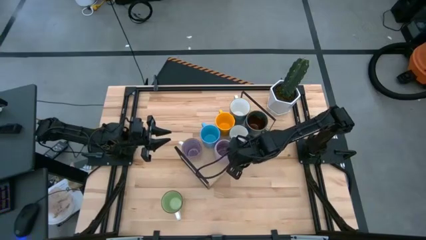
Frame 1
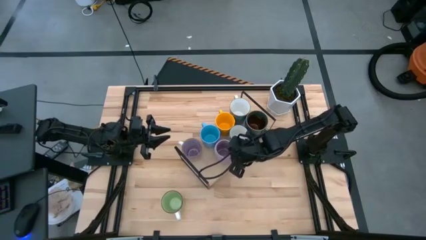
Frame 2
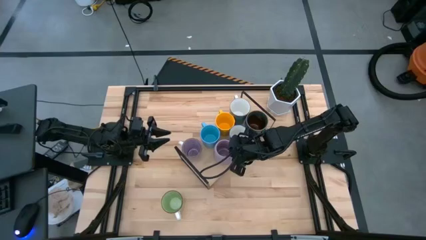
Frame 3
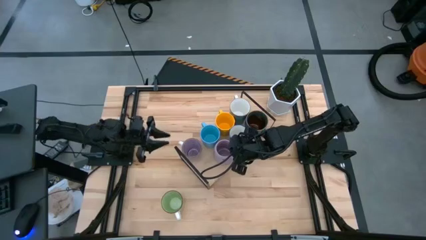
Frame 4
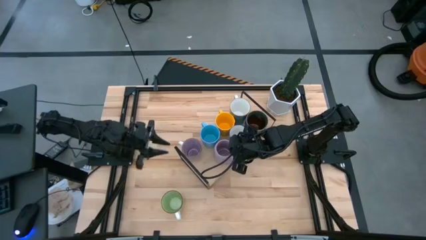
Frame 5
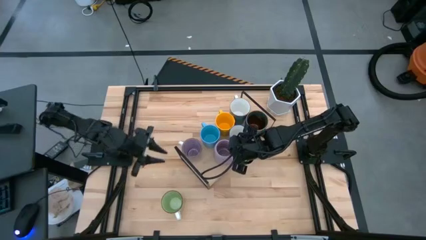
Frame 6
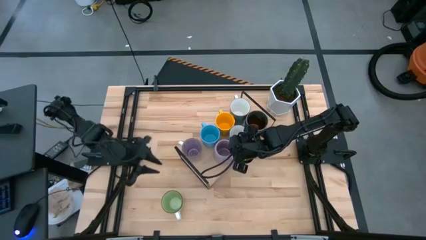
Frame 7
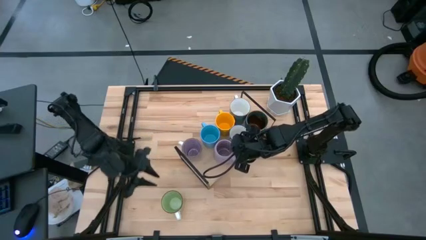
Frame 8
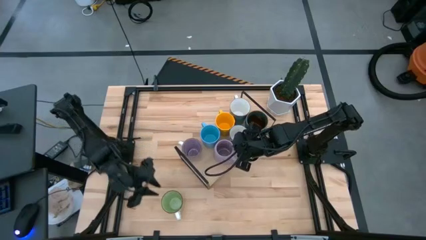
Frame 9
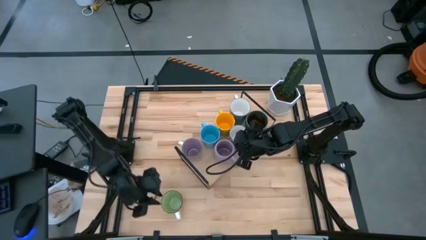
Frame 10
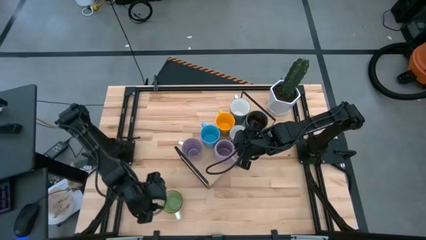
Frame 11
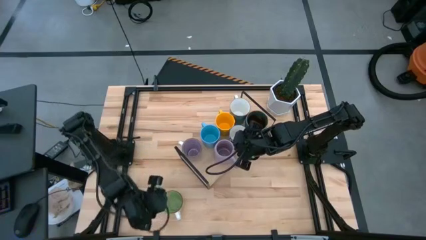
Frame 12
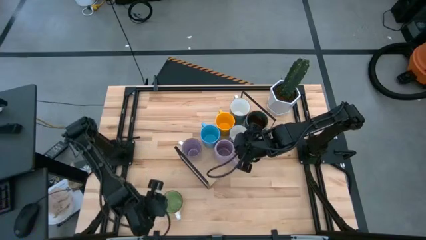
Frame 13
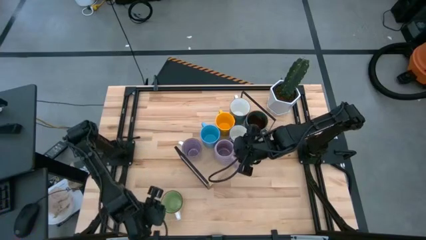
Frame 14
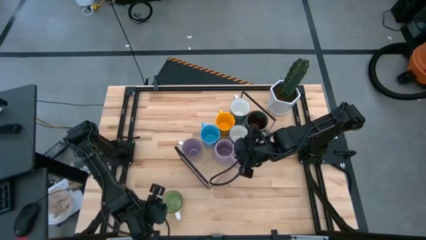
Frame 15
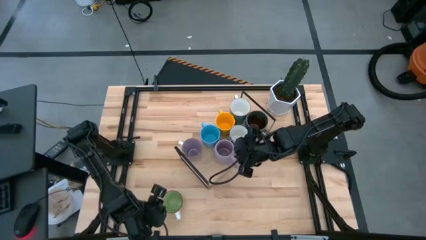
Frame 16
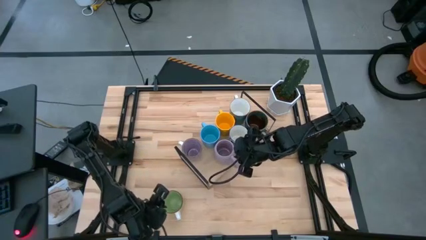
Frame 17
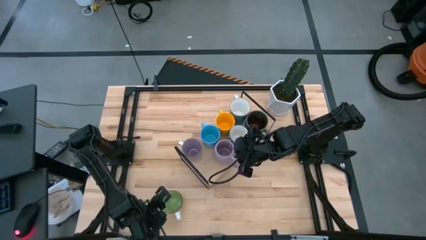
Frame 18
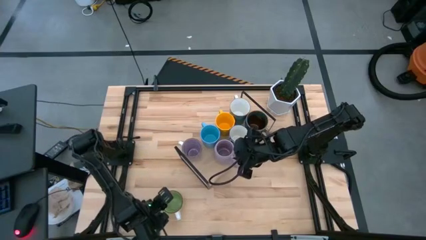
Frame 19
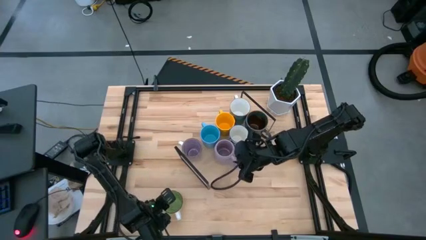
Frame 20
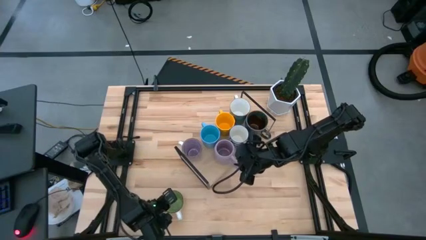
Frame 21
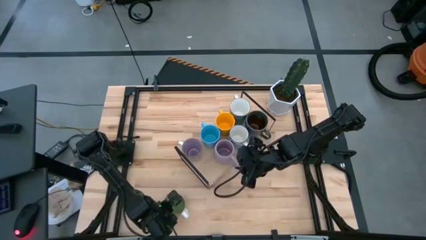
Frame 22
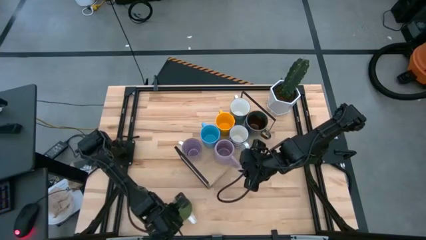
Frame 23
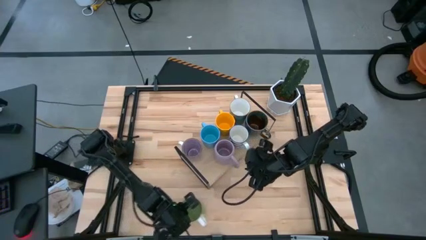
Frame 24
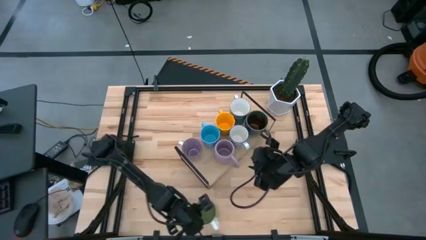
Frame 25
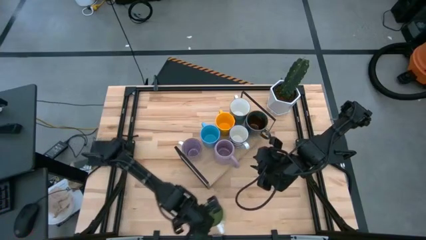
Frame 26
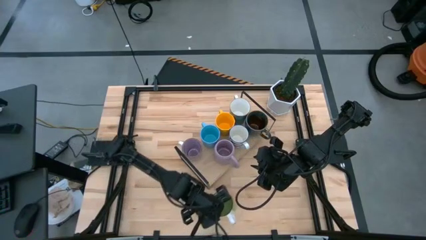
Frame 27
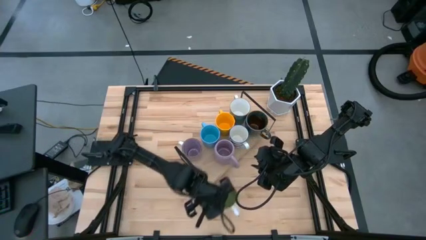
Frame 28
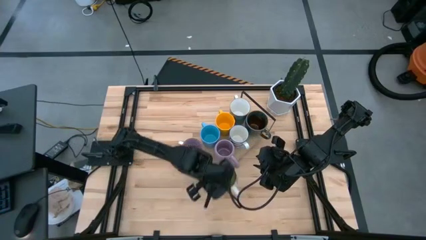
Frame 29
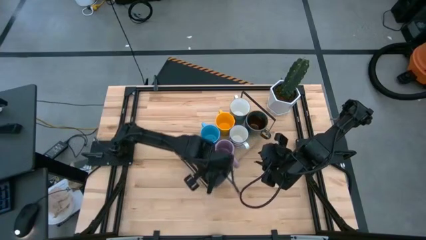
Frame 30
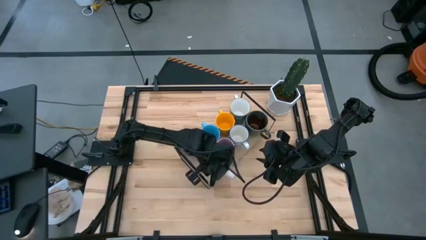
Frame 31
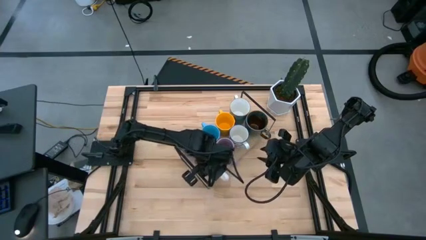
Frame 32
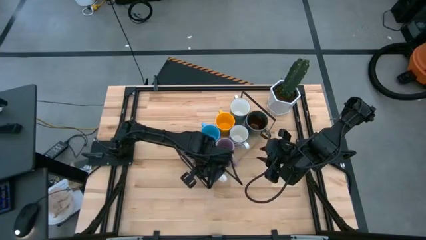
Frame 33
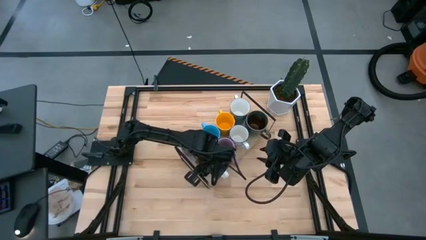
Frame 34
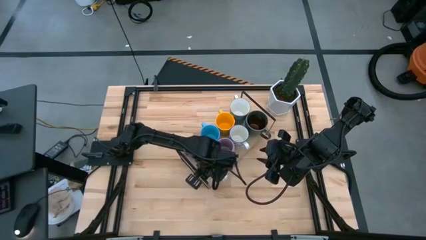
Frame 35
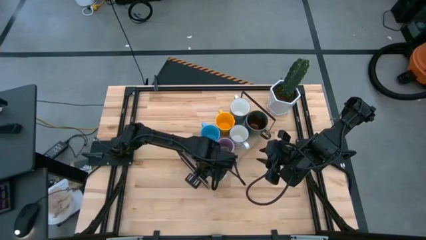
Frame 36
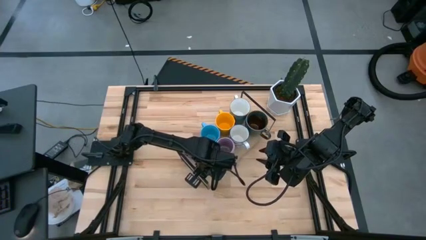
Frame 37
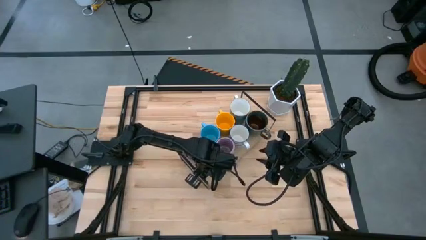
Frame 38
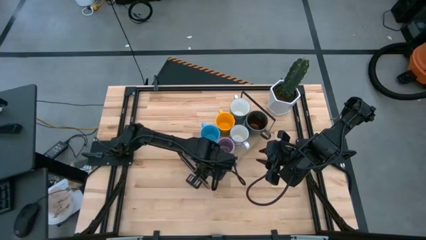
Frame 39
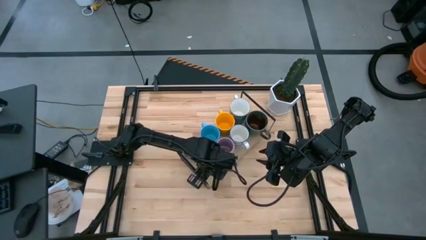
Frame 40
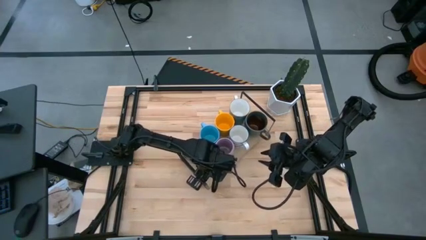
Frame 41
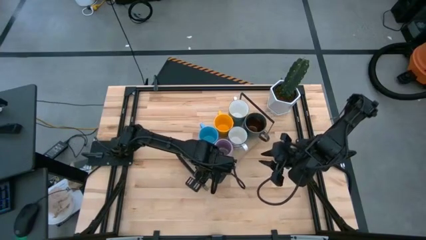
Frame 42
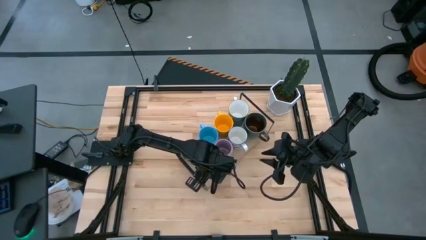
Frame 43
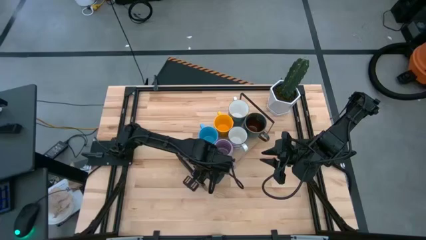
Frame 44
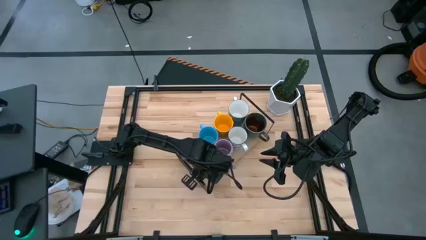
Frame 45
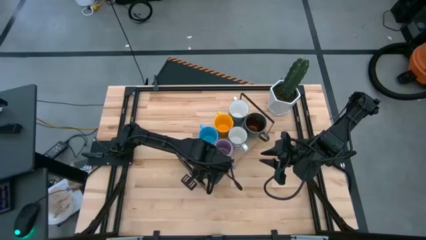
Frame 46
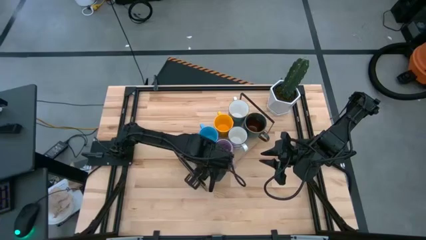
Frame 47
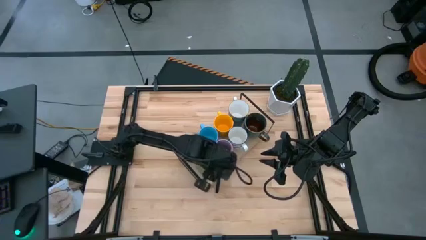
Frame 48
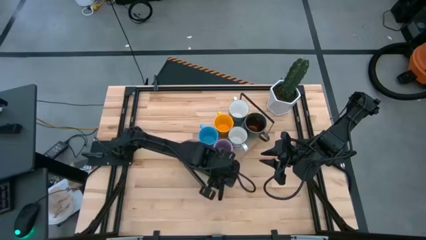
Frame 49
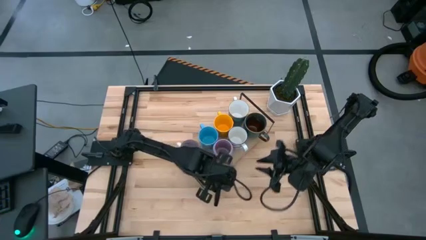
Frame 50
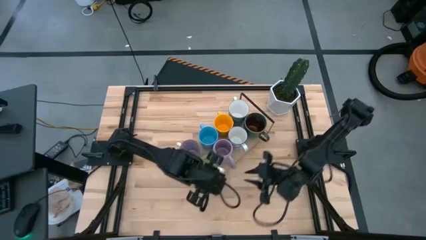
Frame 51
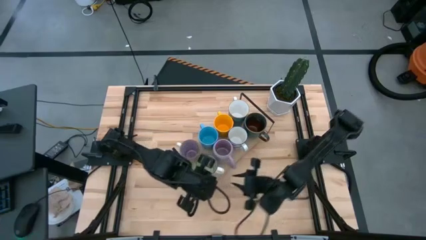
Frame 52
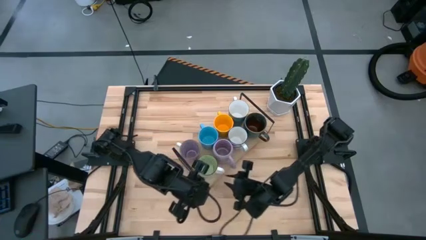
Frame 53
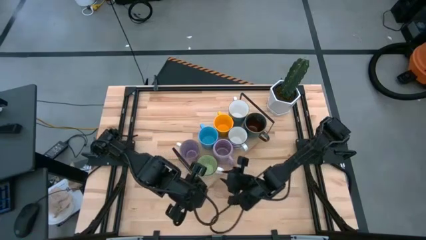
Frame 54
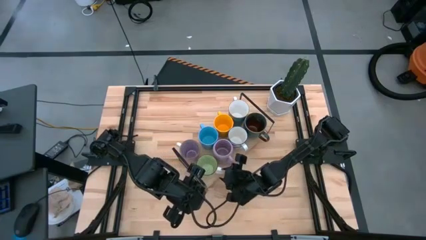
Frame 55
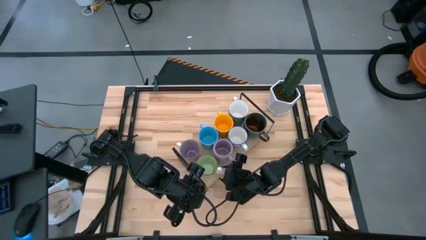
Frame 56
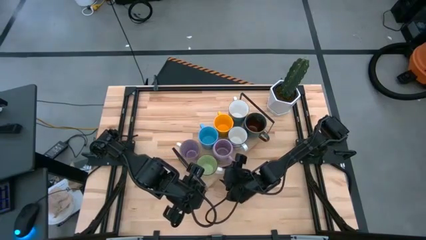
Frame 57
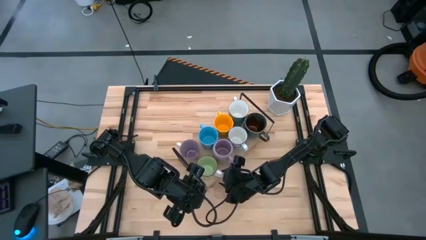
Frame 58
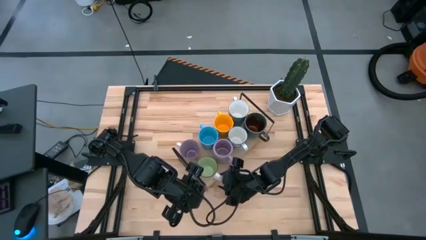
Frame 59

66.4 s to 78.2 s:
Task: Place coffee mugs
Put the green mug on the shelf

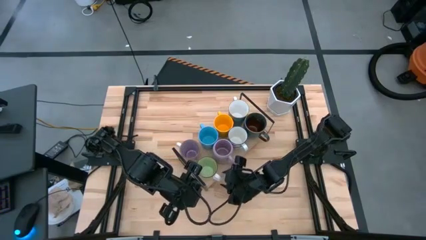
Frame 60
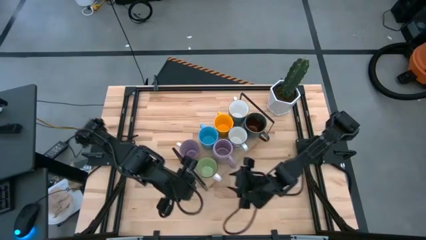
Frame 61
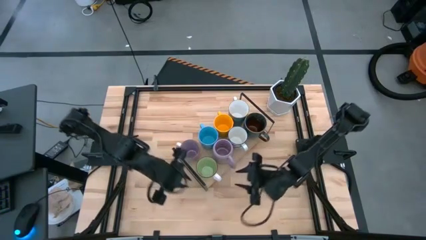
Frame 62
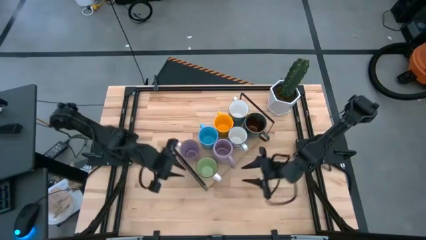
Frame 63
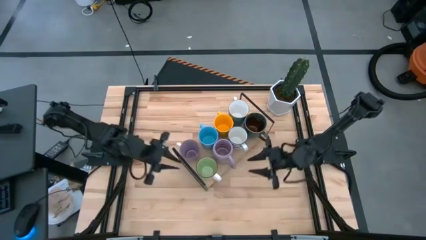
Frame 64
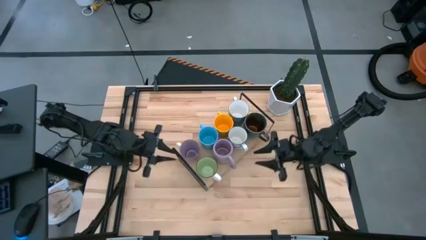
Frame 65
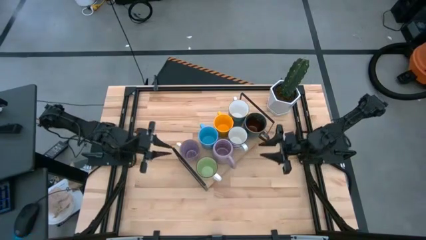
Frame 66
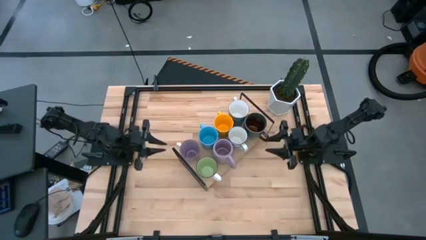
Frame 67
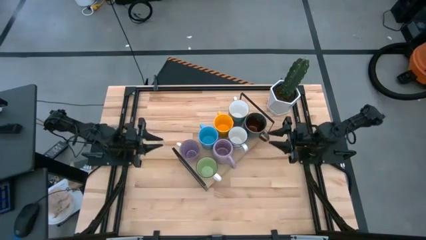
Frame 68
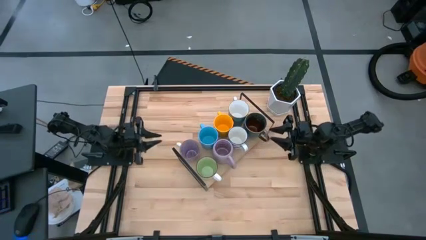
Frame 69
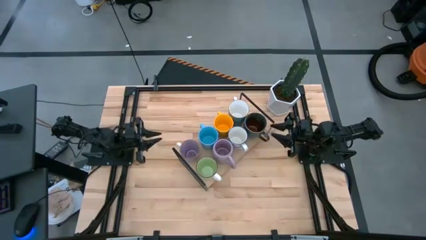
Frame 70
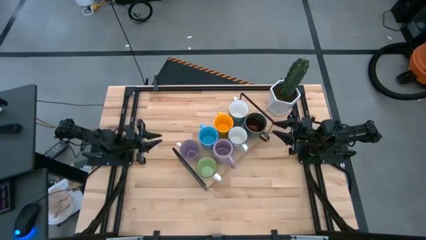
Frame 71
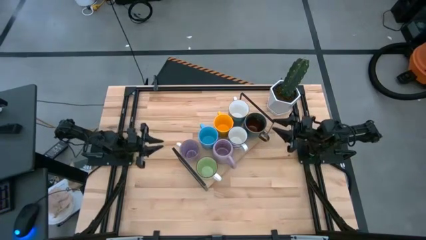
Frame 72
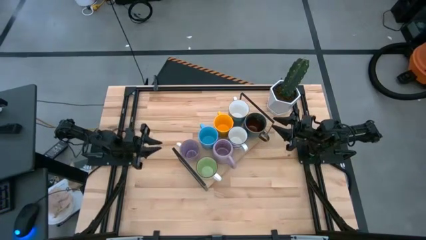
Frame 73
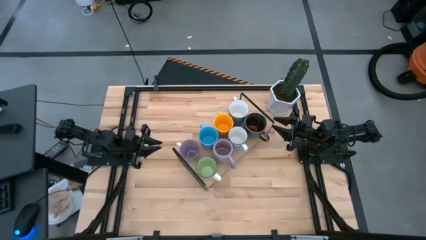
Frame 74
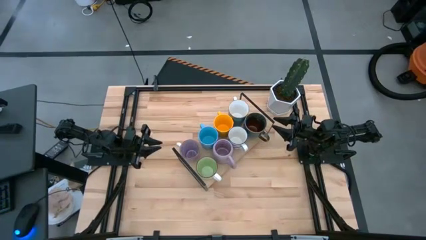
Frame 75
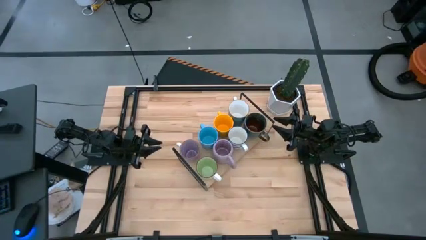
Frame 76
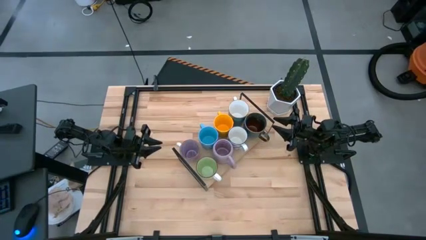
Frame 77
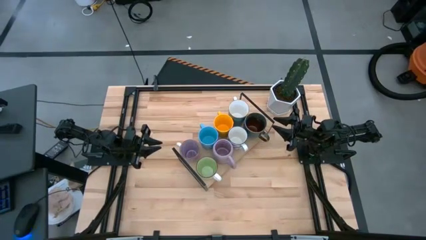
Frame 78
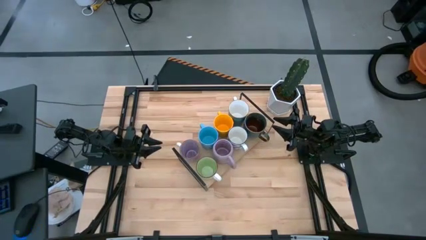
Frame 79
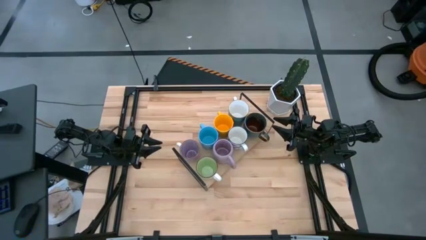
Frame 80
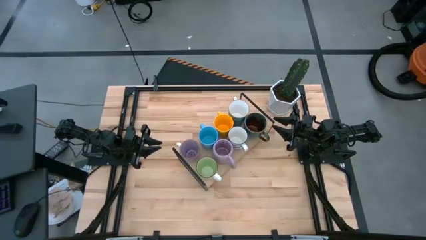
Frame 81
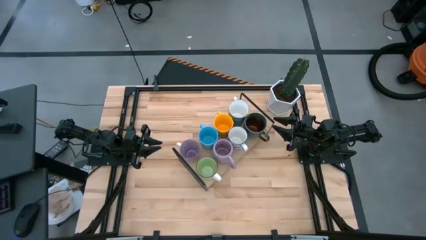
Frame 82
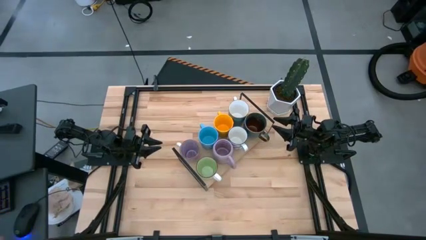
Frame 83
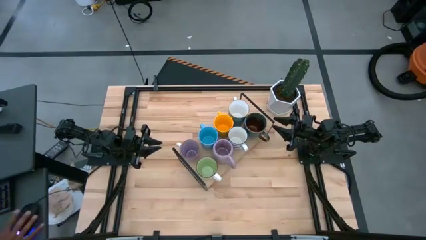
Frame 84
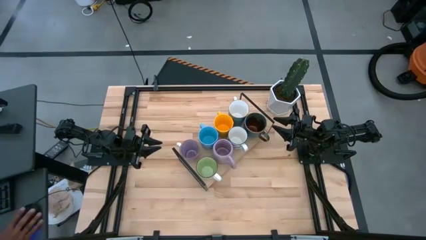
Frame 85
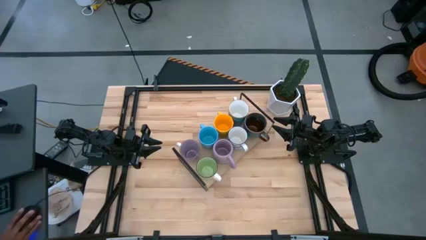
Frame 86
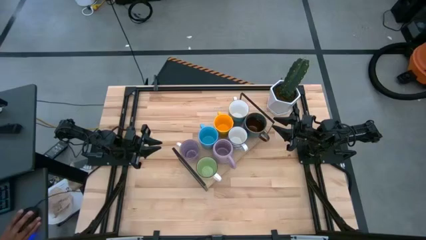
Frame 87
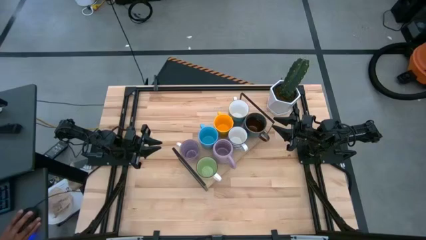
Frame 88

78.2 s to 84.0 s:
Return to Home Position
